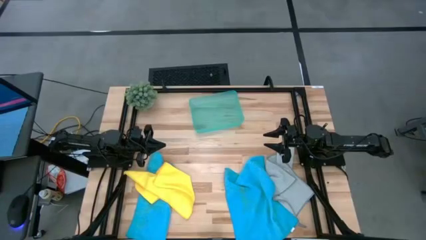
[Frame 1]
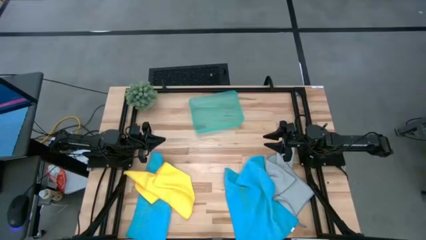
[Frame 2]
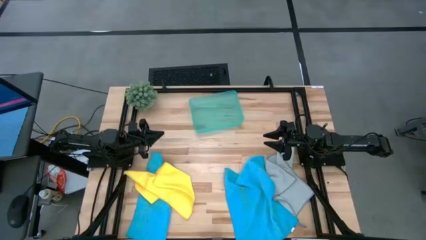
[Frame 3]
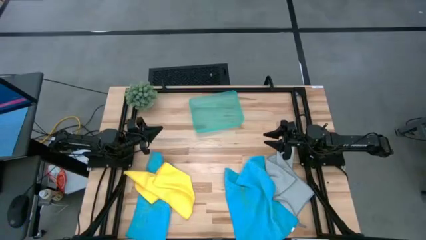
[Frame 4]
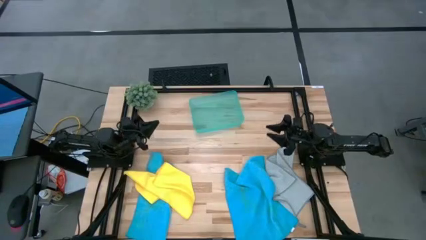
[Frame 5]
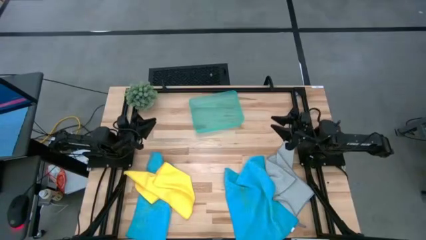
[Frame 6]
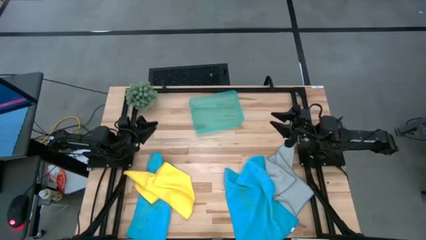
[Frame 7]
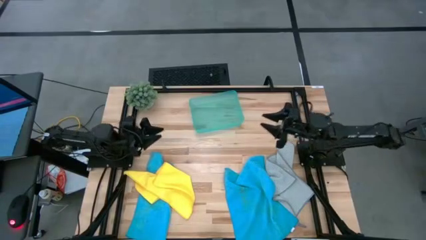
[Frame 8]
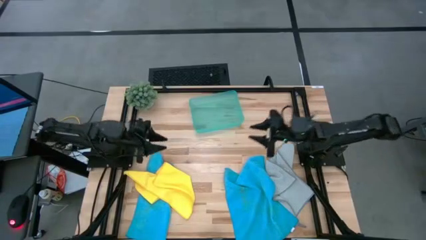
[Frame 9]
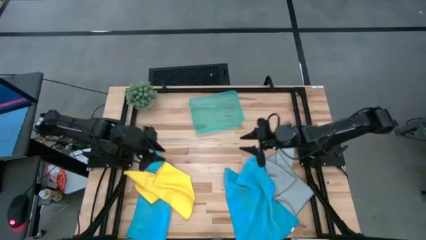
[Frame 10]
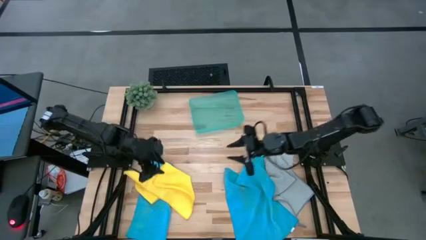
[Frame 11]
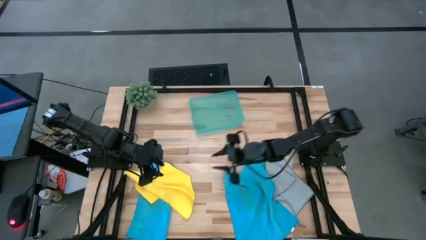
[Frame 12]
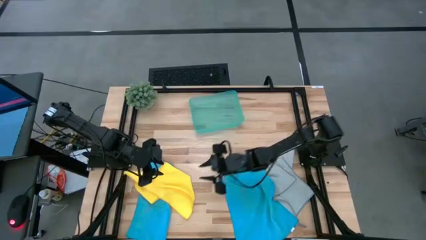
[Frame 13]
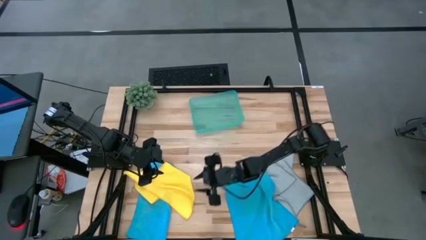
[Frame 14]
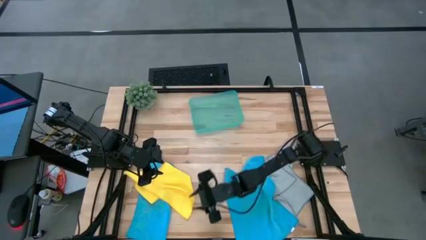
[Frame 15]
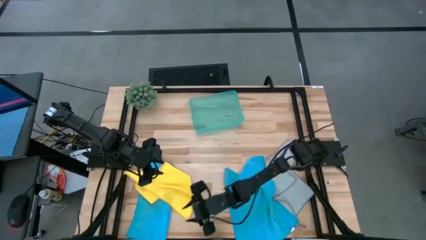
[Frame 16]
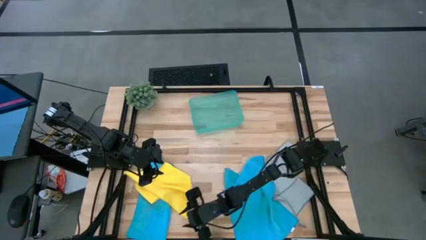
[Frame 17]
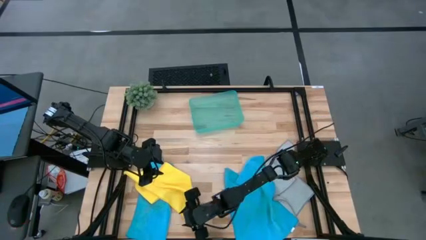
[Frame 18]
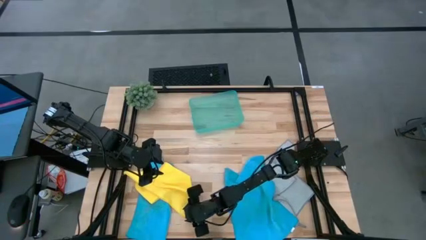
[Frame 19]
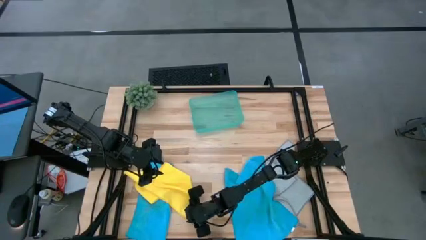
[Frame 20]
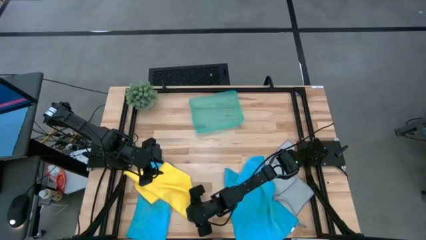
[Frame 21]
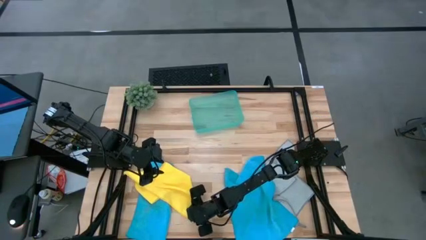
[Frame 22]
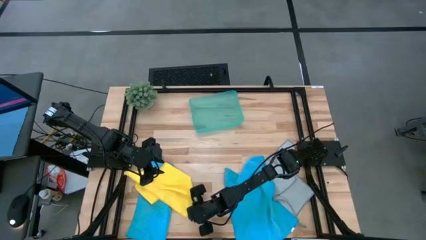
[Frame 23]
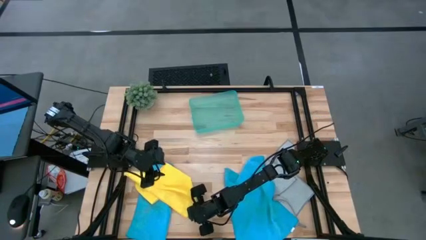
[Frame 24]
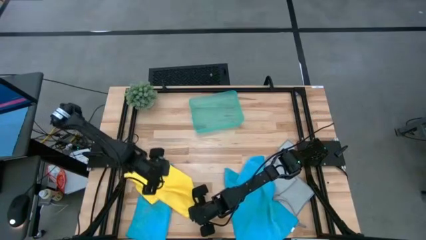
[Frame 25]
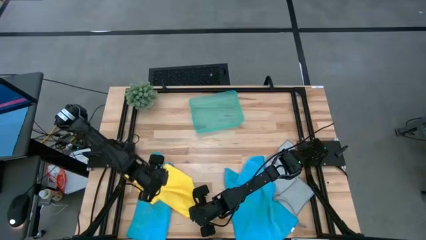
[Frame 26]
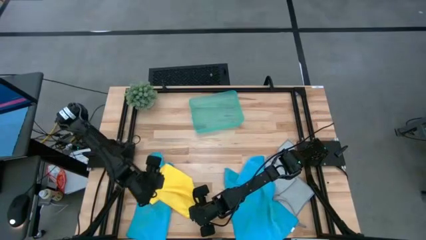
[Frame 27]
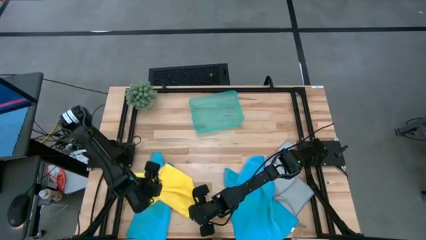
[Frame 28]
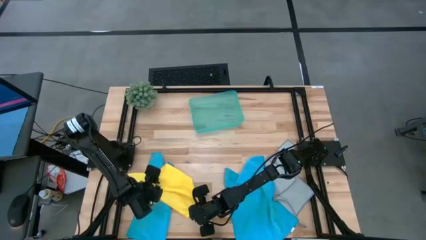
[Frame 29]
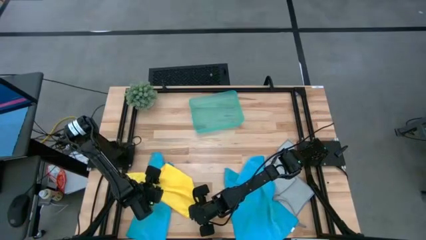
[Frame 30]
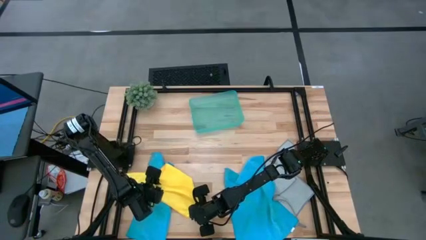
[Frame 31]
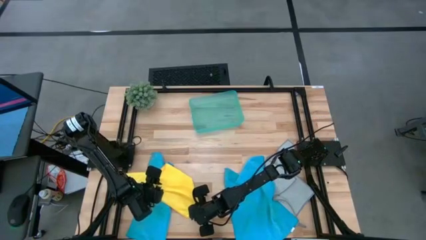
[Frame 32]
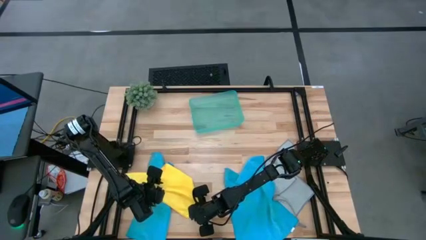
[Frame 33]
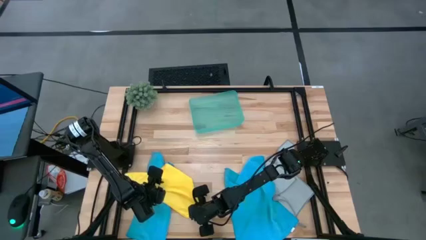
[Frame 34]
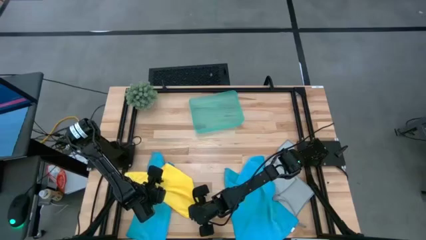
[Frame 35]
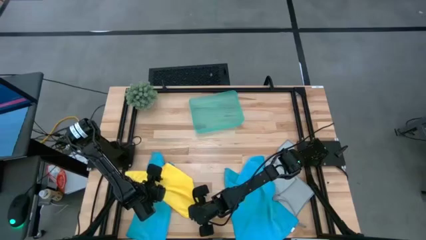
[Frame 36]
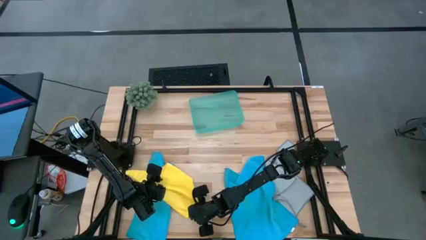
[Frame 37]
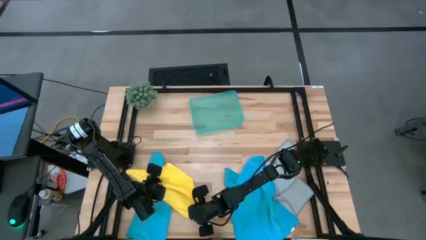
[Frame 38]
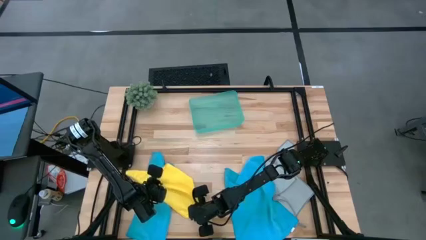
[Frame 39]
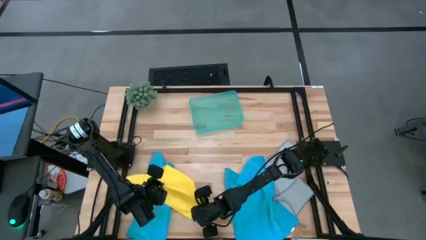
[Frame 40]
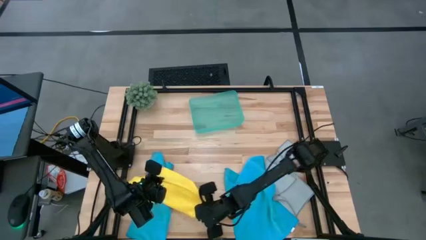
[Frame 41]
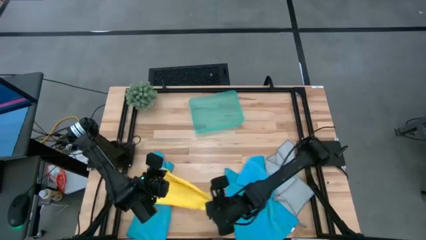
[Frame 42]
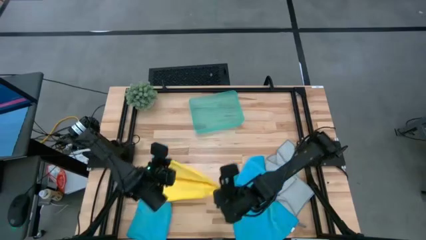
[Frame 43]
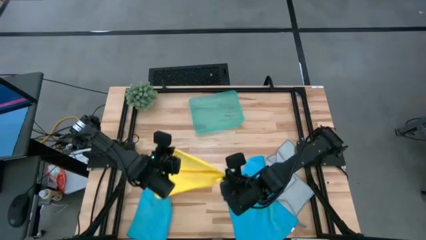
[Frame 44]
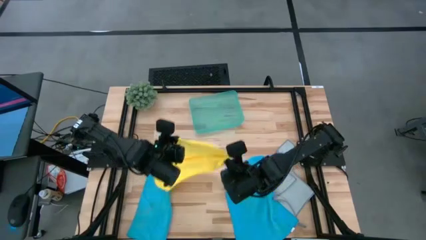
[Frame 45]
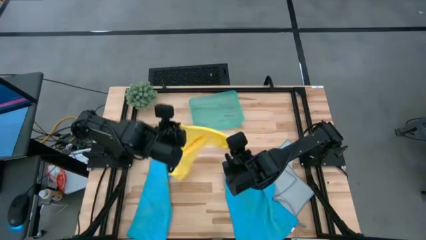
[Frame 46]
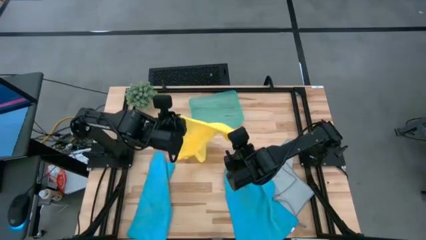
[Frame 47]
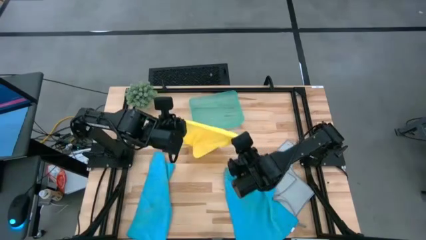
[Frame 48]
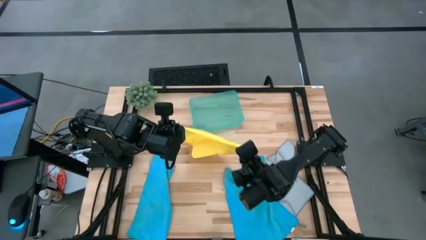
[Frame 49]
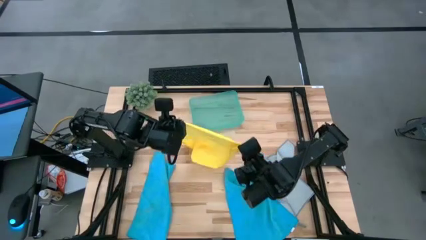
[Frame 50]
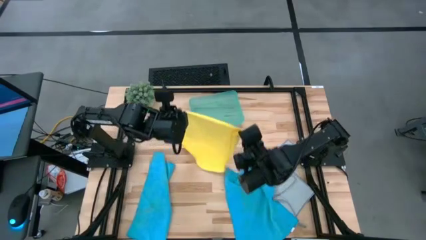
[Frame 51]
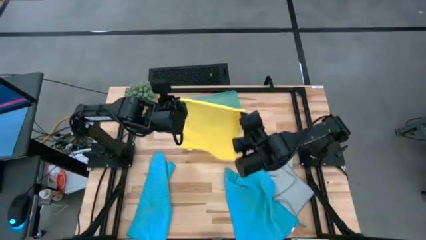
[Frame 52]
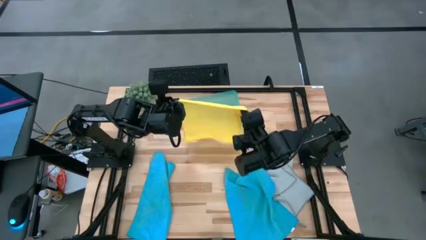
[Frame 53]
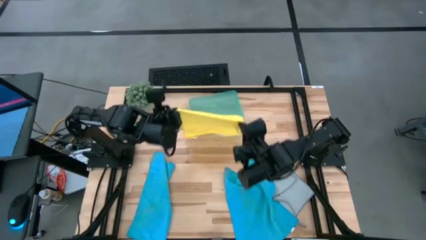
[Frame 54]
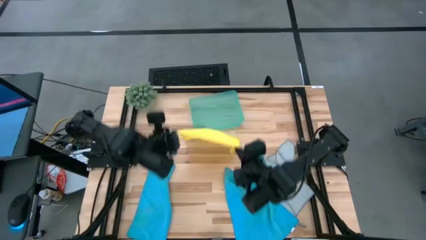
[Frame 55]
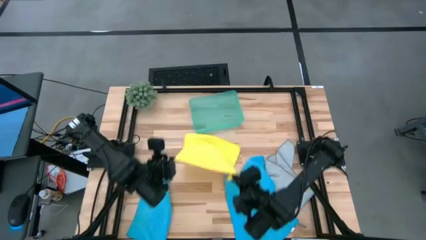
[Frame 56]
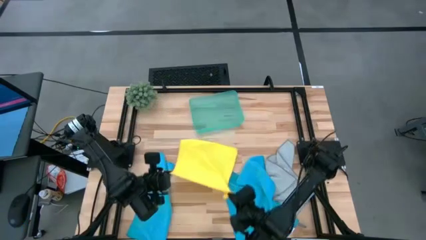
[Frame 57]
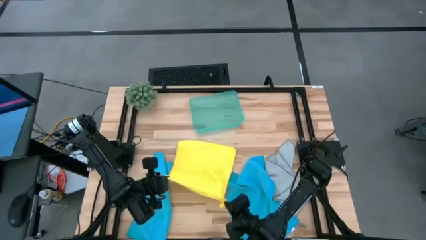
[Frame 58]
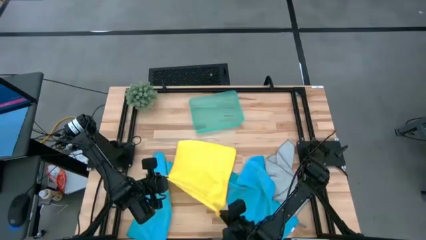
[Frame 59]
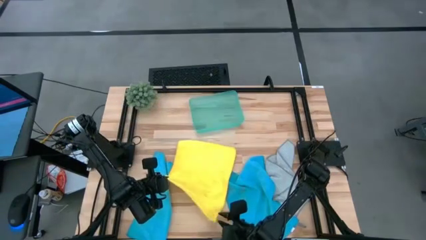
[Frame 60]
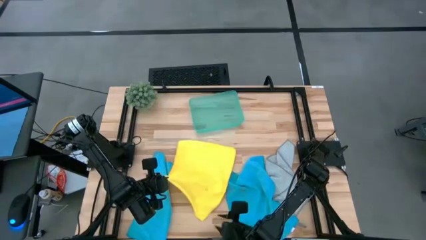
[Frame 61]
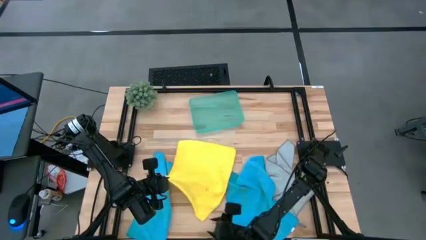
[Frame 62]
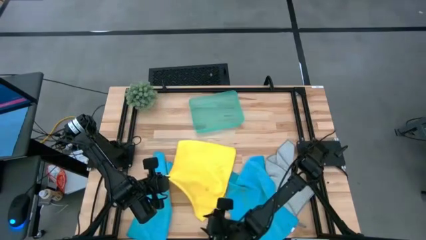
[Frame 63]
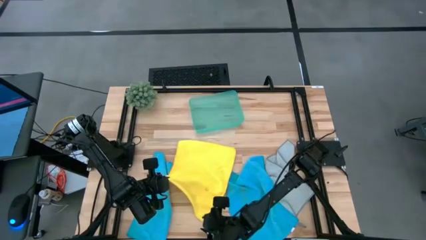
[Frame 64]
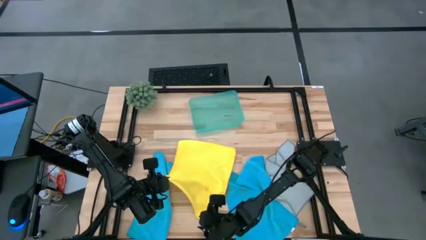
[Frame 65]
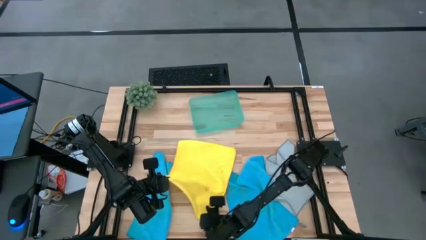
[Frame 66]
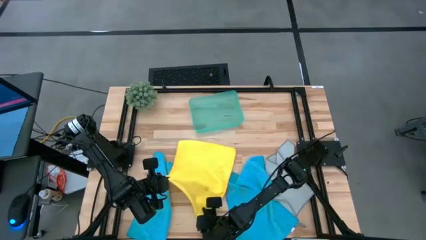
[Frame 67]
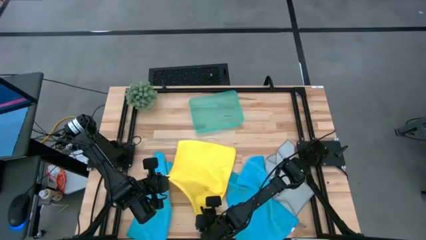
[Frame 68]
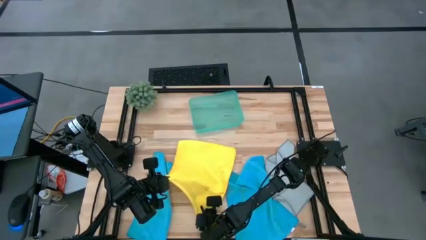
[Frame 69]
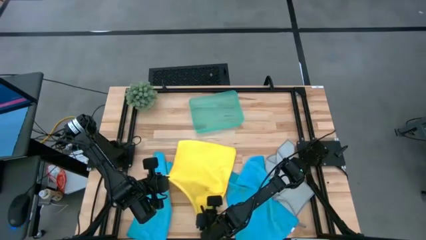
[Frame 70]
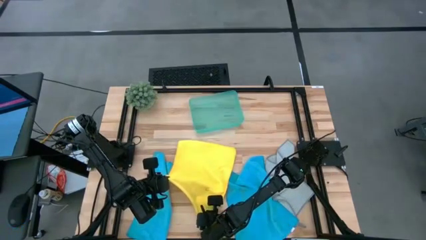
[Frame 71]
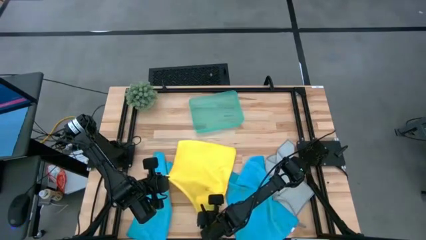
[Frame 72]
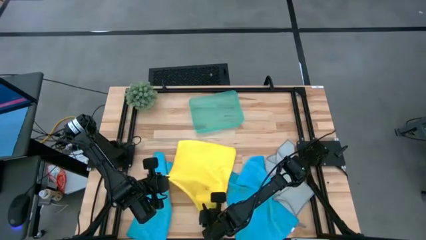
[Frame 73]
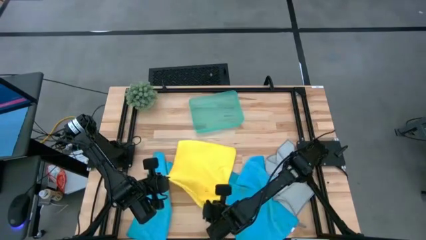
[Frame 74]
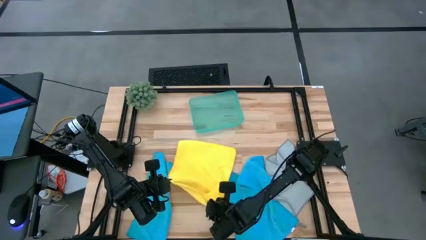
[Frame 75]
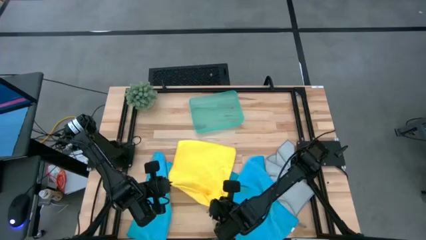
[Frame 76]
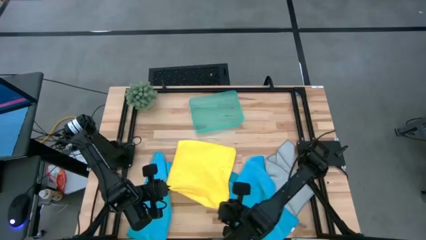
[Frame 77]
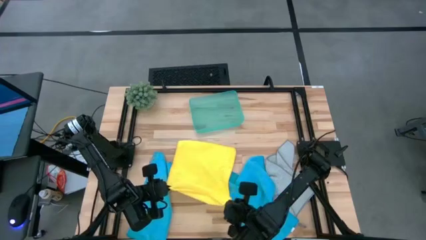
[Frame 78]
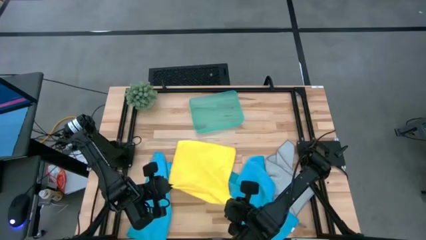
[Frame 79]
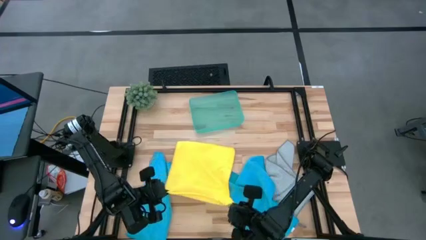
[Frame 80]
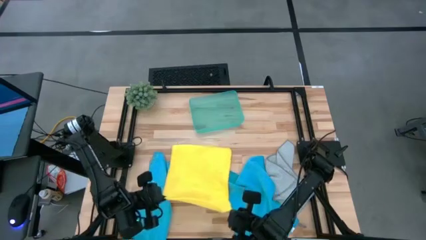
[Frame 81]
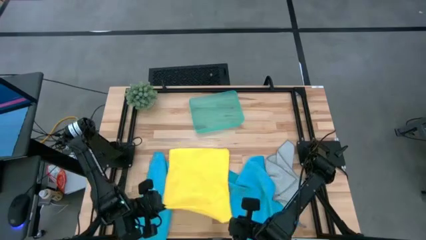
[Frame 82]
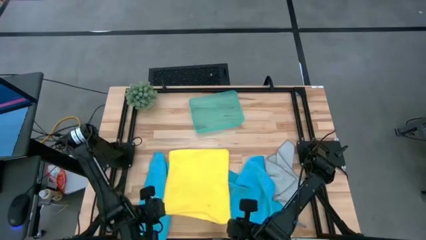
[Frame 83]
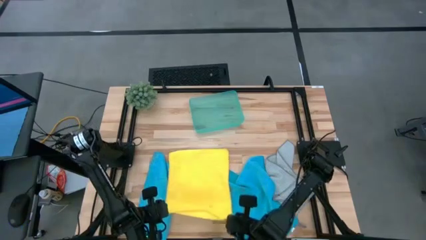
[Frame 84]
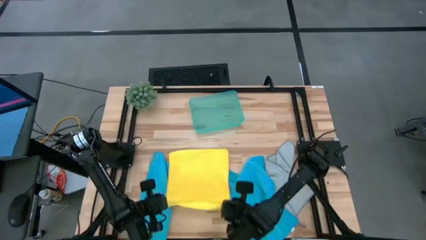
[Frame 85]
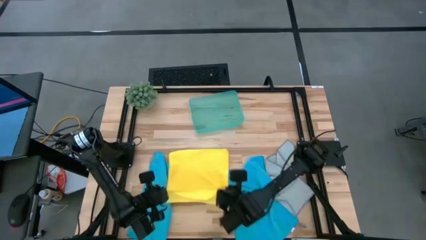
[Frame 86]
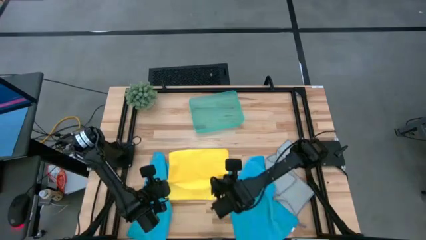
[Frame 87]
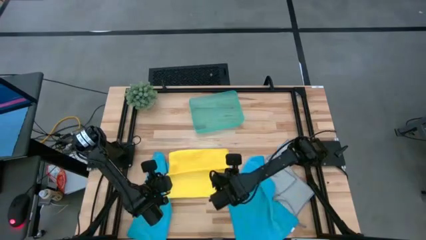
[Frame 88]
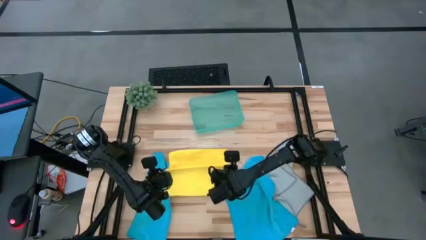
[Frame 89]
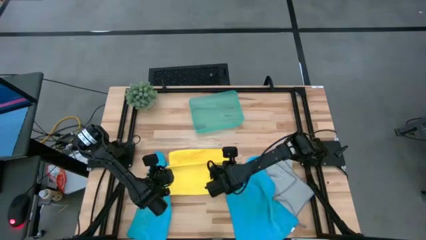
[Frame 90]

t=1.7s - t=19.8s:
Task: Fold microfiber towels
Fold the yellow microfiber towel
